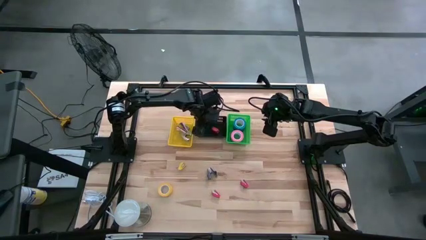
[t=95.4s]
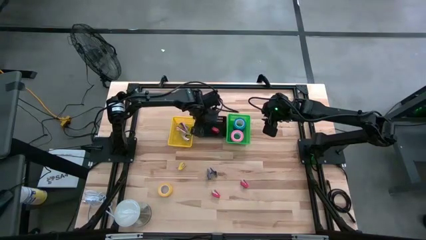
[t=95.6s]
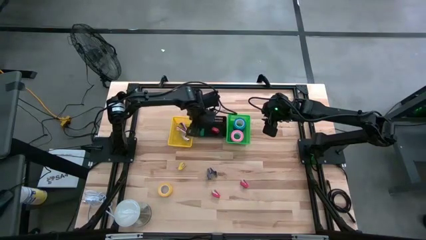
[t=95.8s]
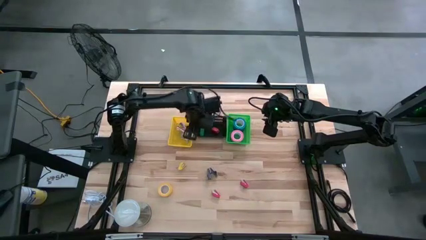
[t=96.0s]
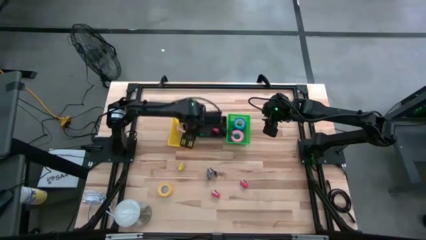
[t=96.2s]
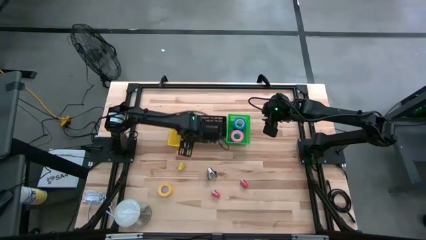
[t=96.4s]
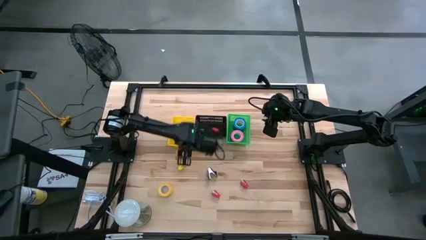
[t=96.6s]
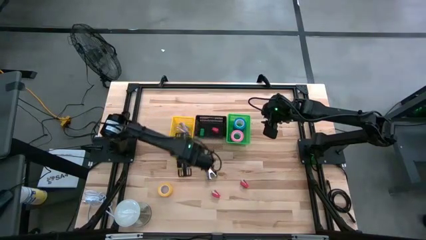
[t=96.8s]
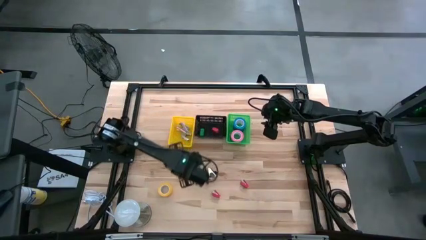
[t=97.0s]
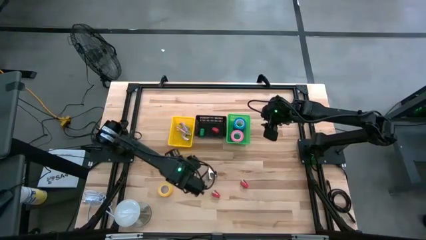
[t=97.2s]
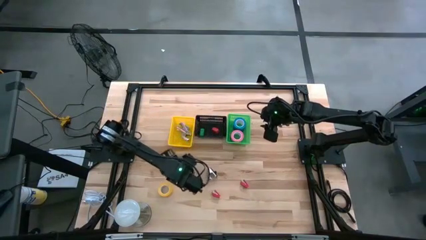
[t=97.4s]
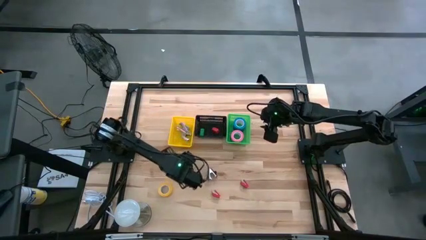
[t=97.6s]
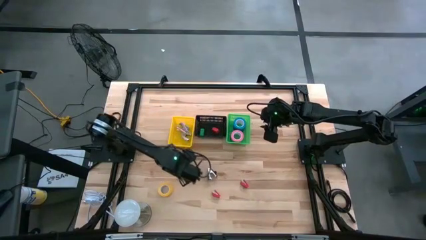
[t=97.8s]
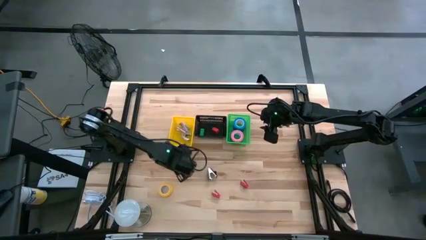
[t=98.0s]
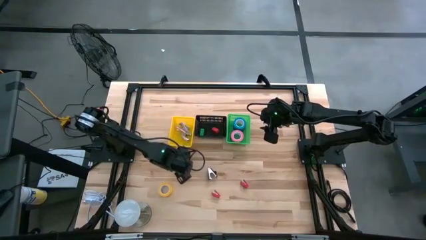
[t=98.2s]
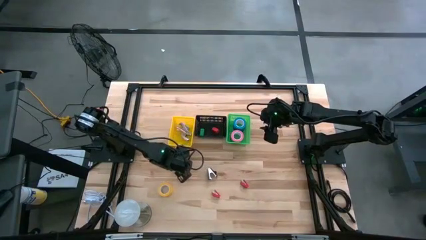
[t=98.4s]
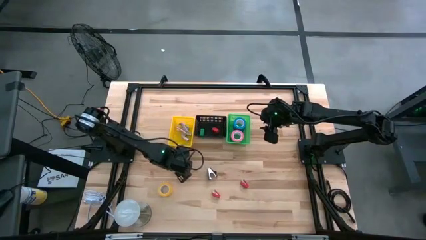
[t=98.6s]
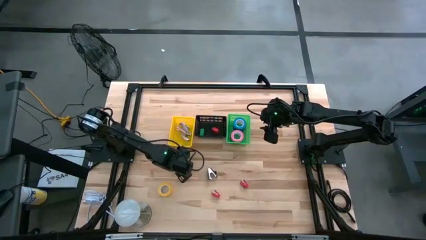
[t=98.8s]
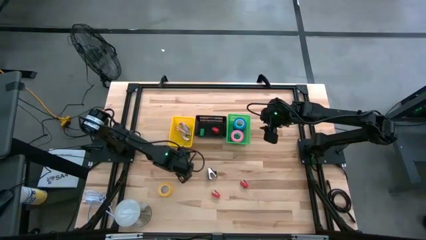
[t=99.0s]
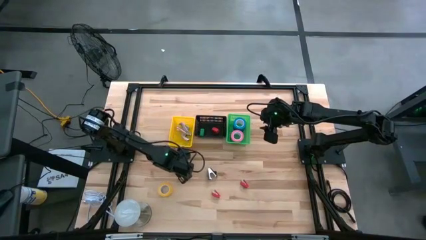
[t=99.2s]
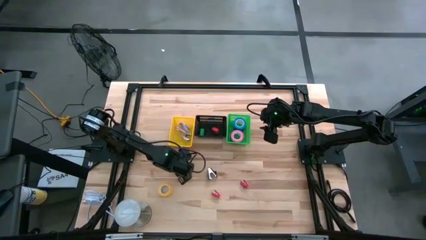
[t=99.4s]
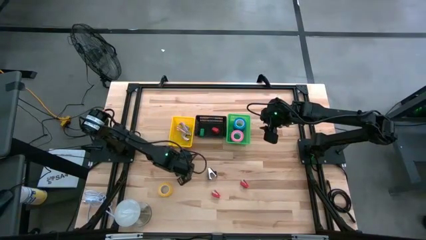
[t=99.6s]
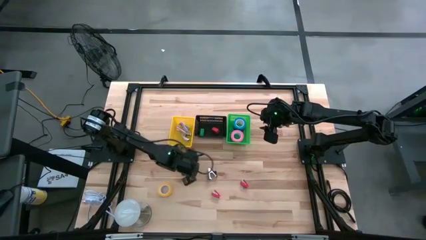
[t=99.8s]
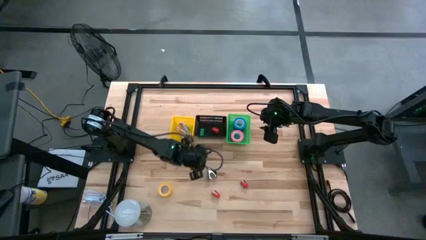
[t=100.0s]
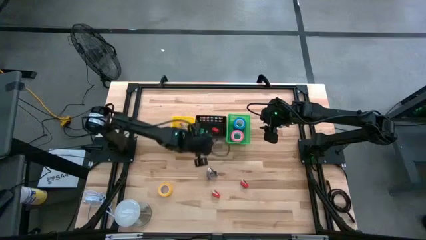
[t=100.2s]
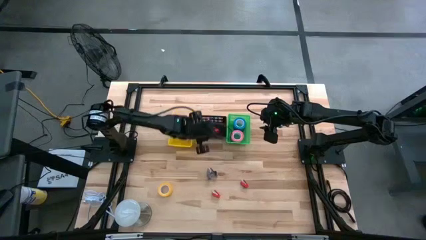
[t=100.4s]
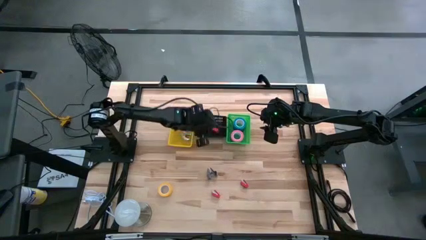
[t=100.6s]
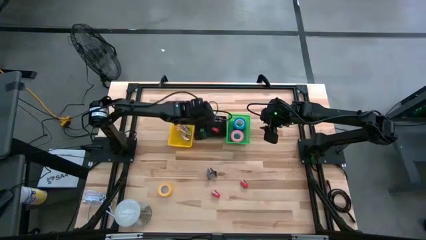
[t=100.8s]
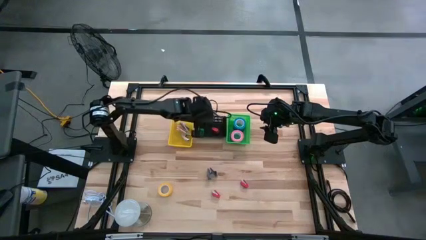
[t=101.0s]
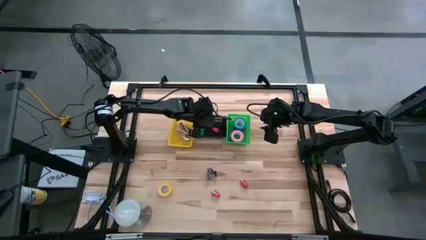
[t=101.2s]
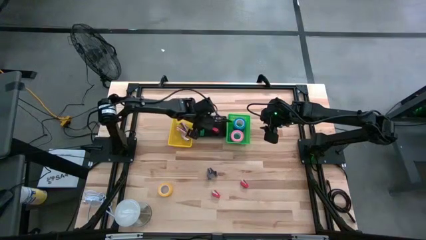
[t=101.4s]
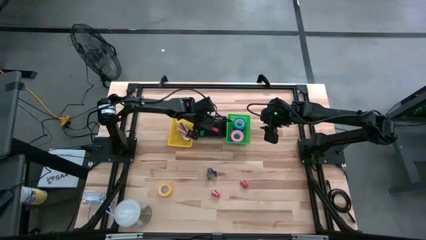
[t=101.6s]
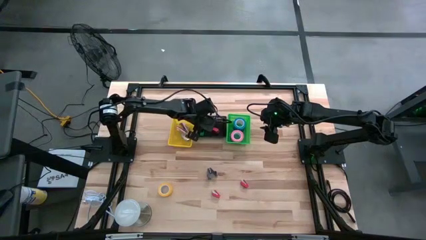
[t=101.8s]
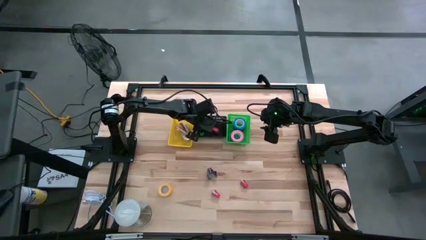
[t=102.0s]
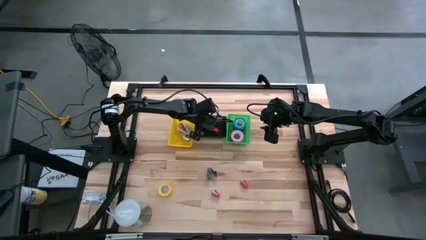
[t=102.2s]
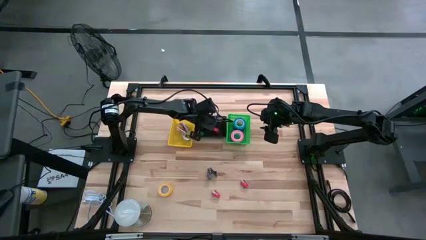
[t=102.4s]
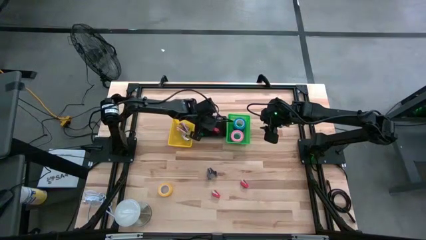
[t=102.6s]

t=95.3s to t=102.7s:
Task: Pick and place Stapler, Stapler remover, tape
Put the yellow stapler into the black bin

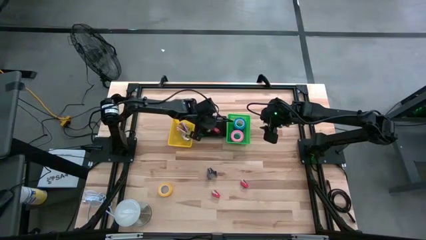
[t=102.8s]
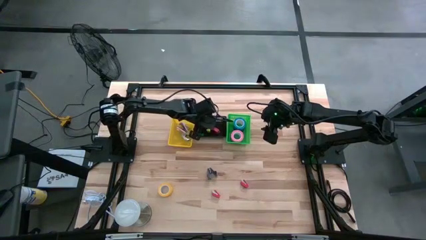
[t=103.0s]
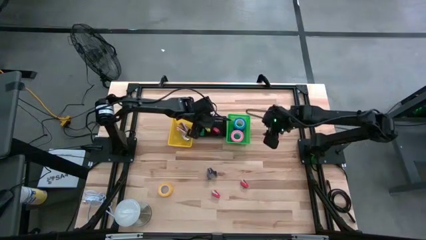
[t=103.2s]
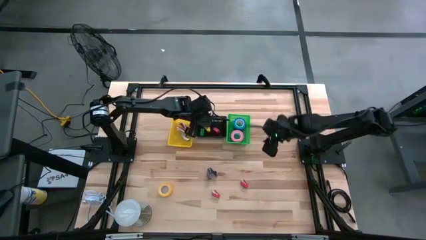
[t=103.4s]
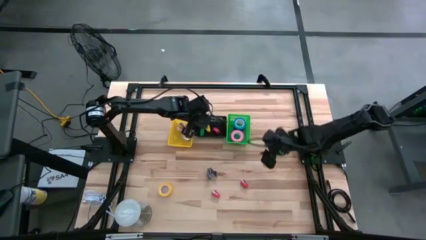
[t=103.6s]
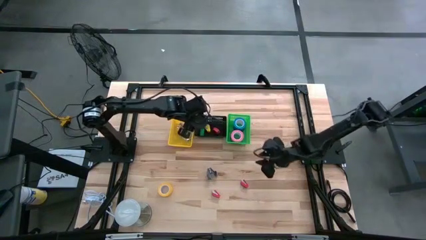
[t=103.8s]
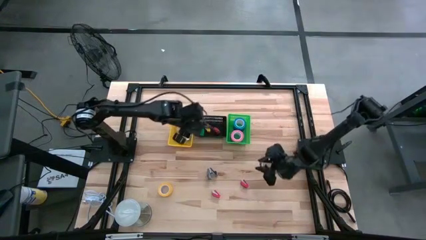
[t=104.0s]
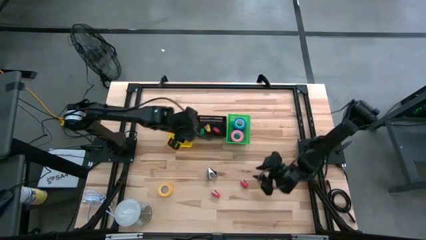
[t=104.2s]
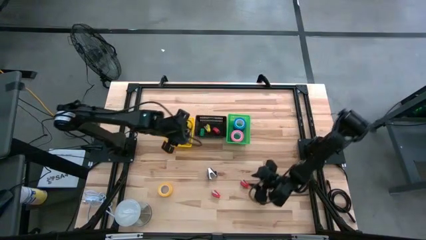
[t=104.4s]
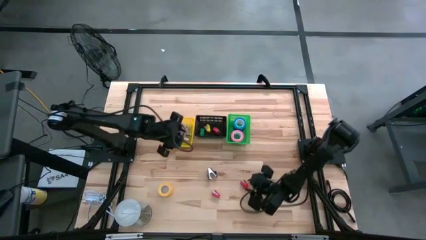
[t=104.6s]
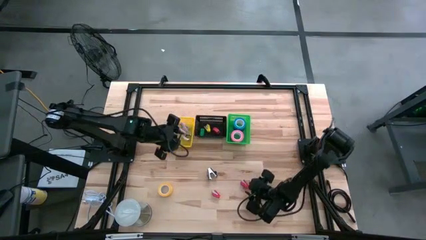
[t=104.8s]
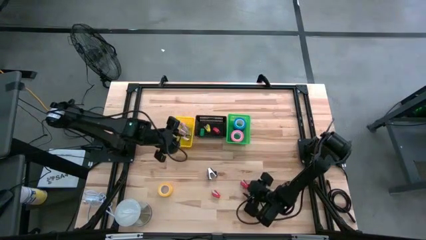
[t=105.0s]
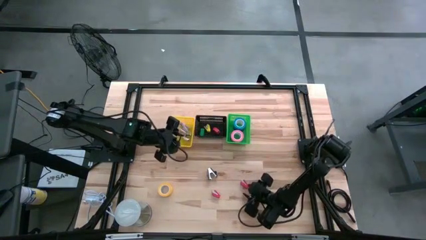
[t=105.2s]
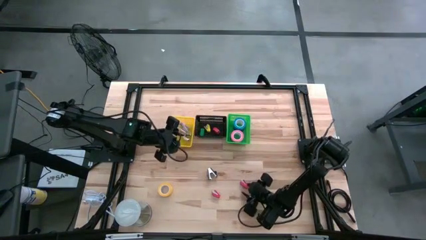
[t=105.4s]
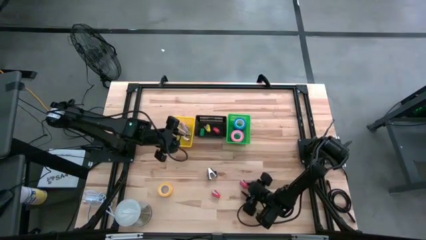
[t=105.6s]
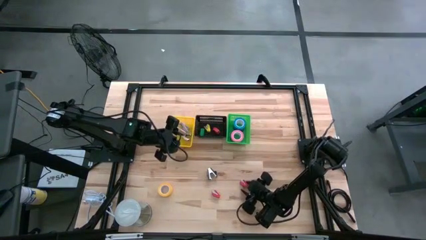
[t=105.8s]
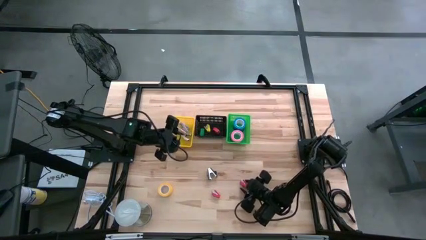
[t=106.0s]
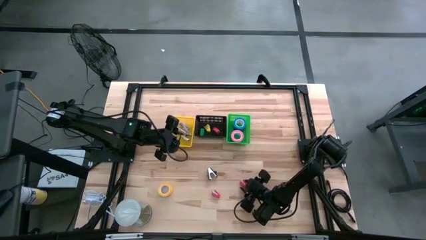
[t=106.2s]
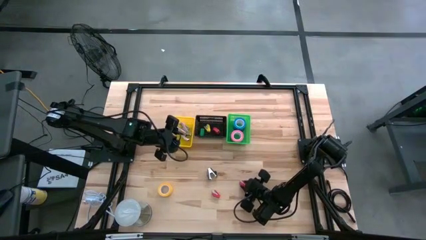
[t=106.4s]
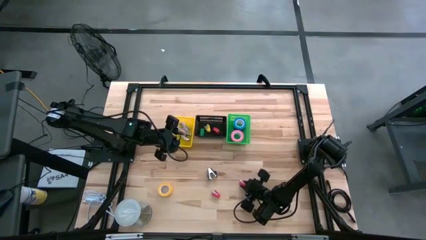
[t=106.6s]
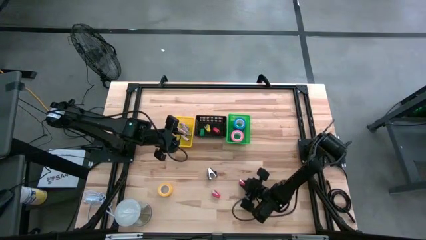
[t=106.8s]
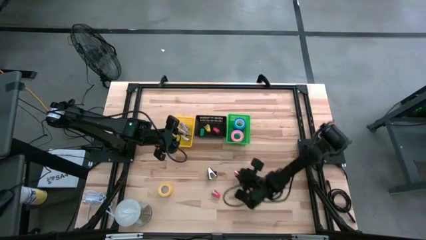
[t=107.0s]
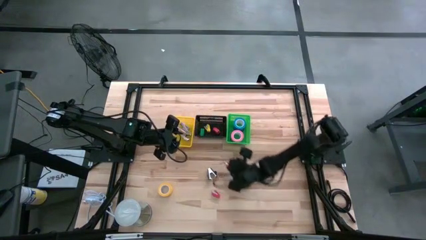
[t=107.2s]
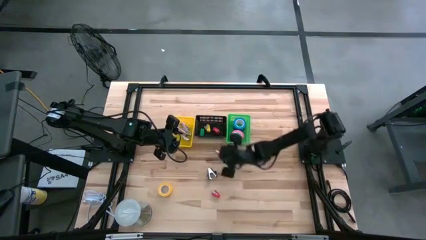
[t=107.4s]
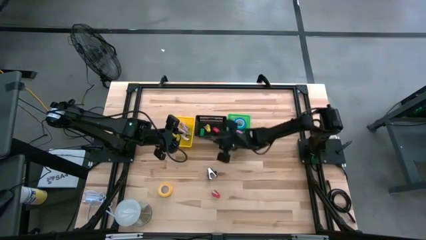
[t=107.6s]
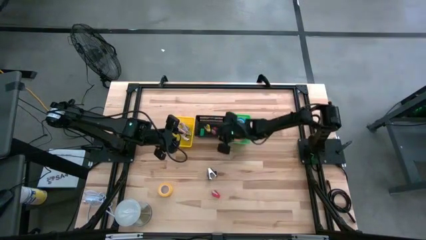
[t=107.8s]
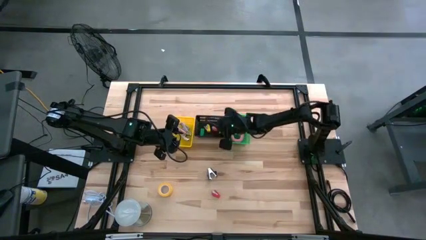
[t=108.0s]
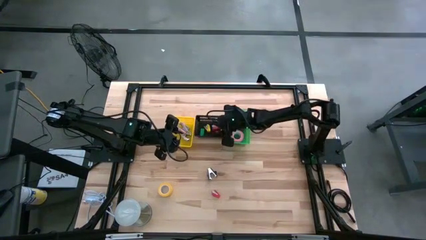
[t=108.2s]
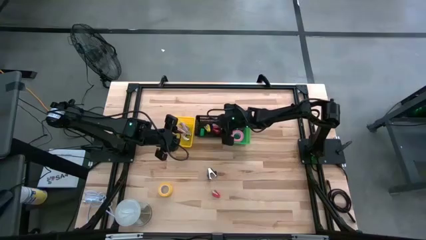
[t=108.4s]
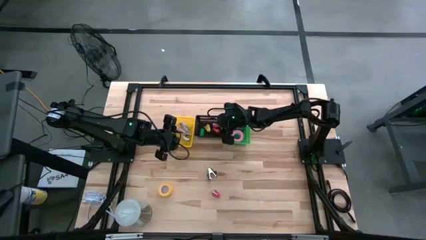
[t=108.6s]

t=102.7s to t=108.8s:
Put the right red stapler into the black bin

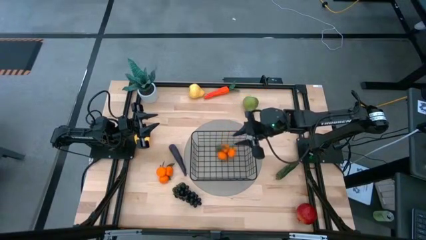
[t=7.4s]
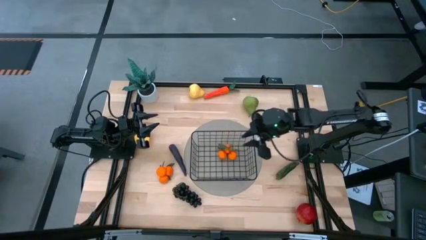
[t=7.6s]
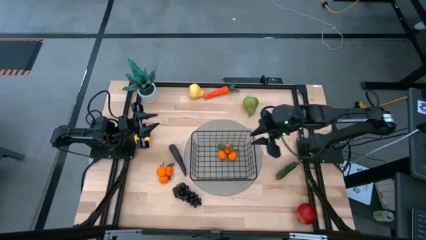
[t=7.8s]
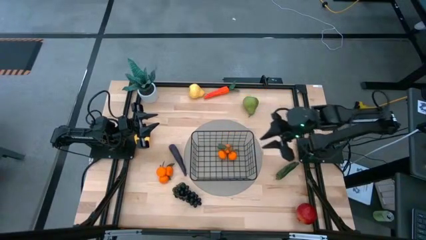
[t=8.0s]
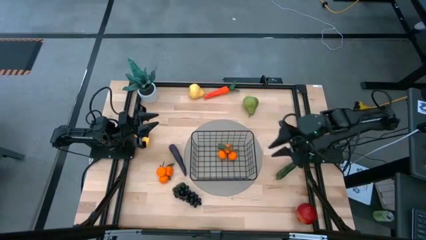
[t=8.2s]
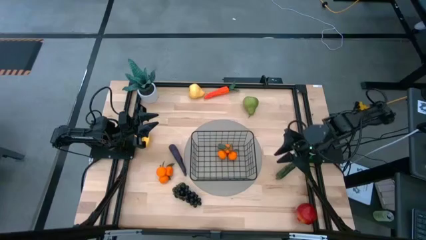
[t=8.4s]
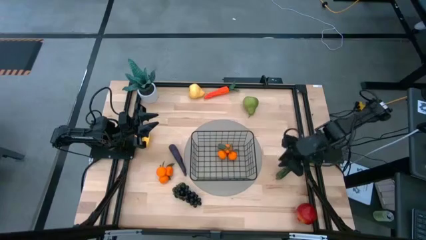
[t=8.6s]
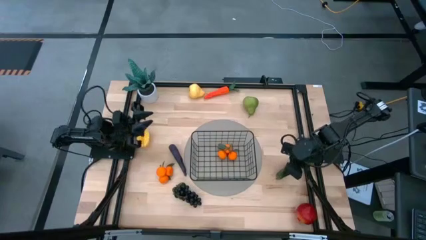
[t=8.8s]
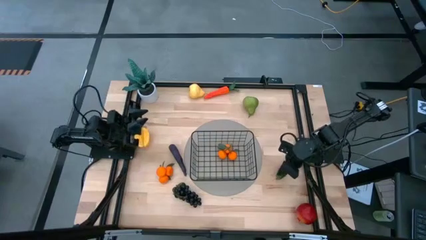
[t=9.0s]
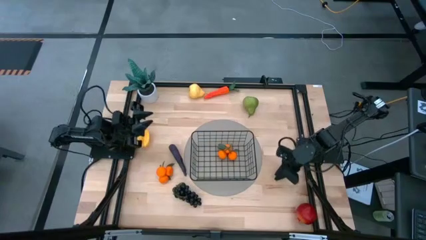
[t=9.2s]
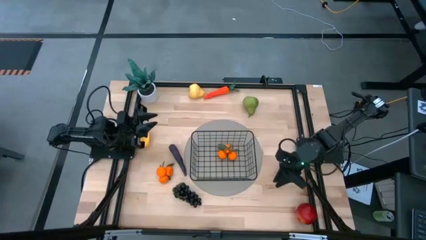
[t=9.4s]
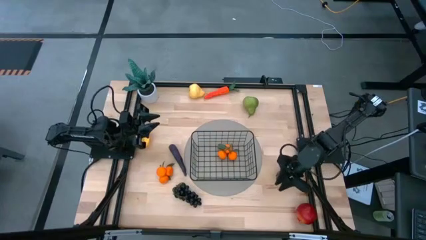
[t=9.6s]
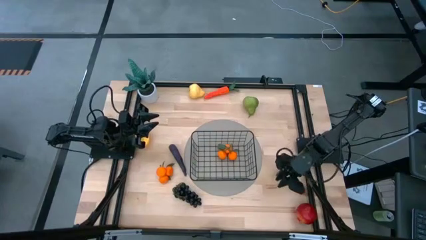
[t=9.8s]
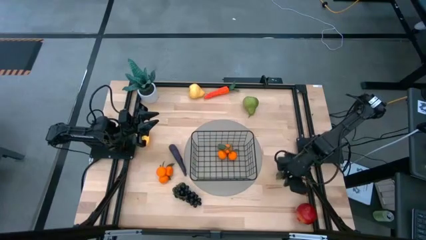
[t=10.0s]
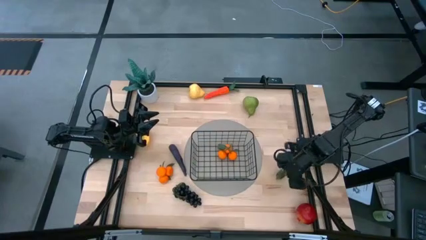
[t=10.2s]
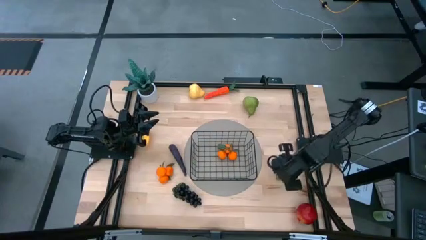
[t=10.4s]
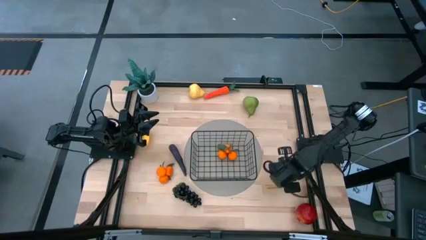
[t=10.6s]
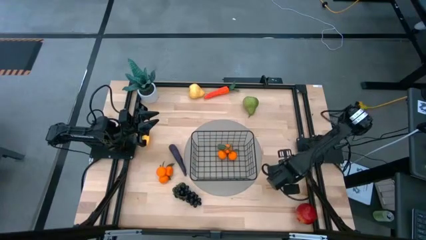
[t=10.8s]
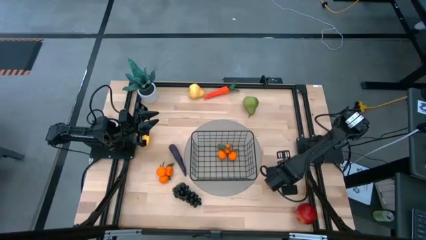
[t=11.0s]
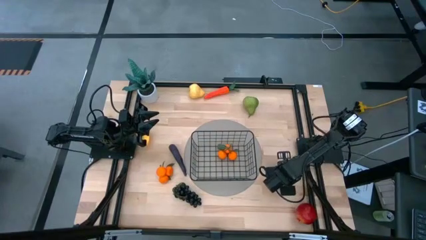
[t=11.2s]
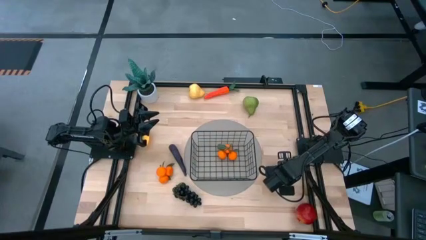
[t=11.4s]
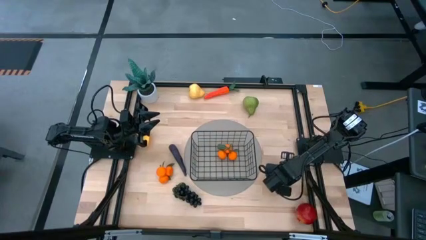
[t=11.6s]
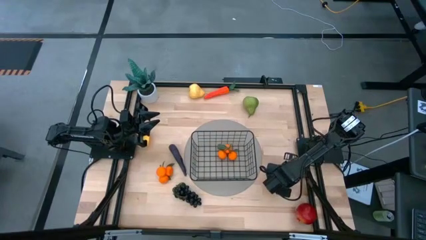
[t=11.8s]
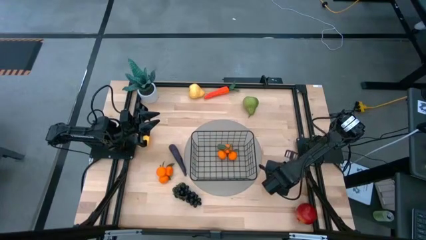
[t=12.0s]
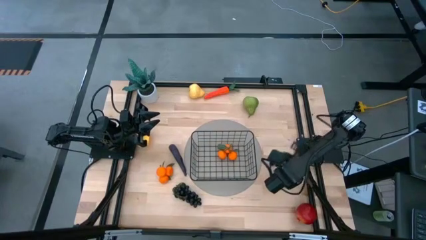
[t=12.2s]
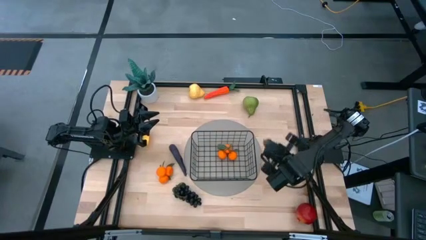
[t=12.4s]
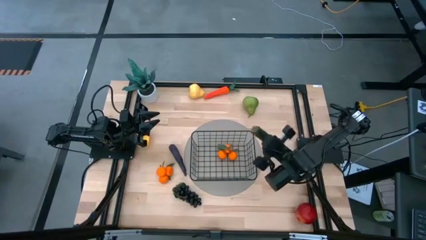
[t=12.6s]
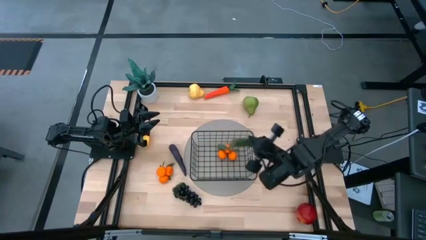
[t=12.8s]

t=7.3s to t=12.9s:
Task: Build produce basket
Put the green bell pepper into the black wire basket
